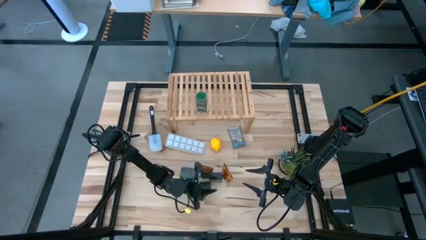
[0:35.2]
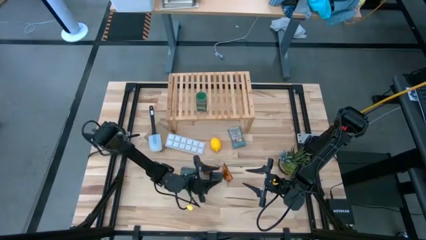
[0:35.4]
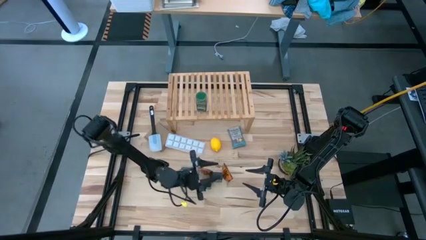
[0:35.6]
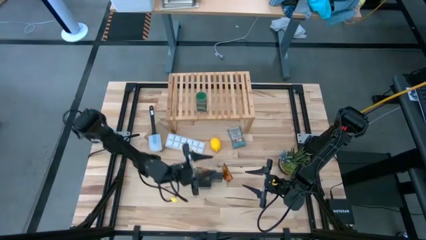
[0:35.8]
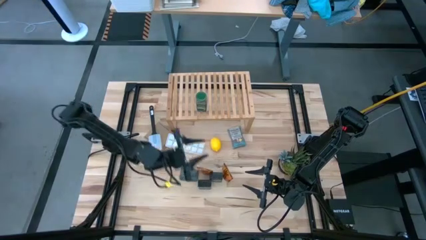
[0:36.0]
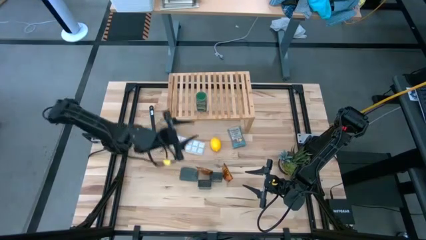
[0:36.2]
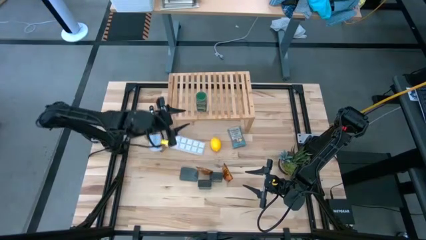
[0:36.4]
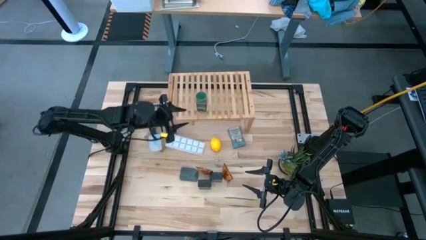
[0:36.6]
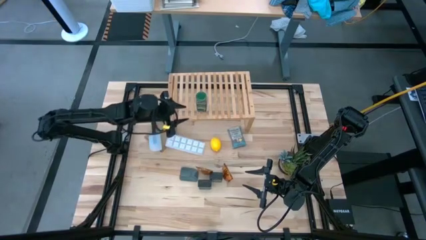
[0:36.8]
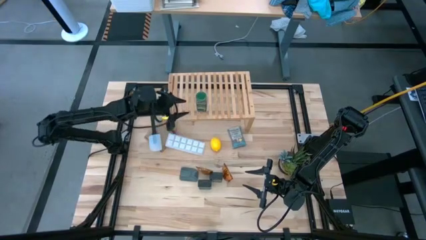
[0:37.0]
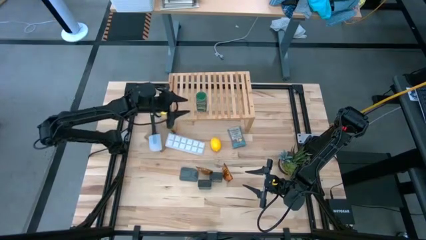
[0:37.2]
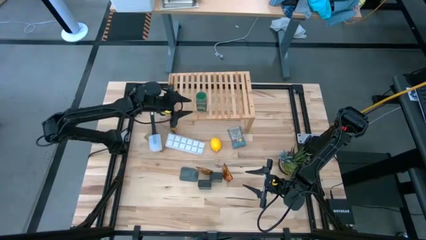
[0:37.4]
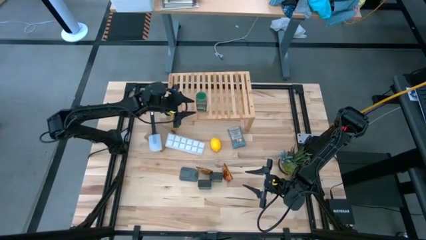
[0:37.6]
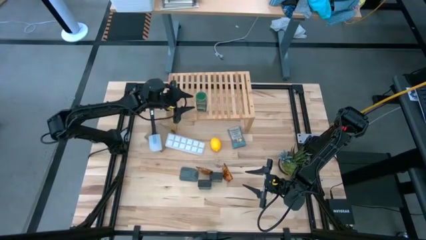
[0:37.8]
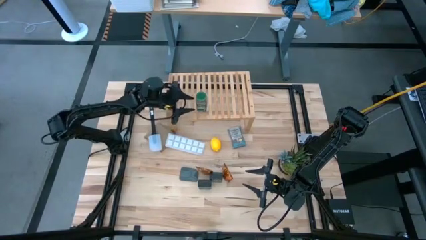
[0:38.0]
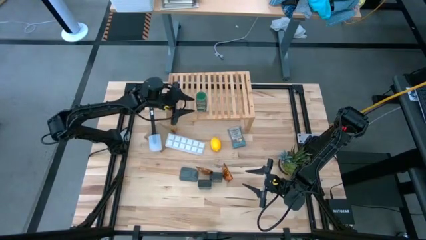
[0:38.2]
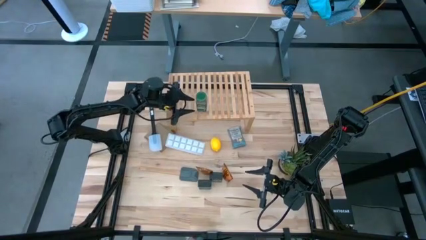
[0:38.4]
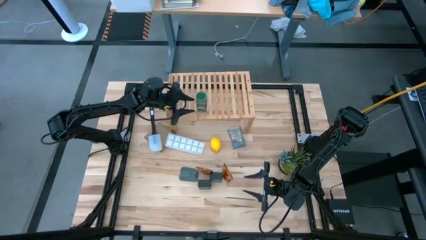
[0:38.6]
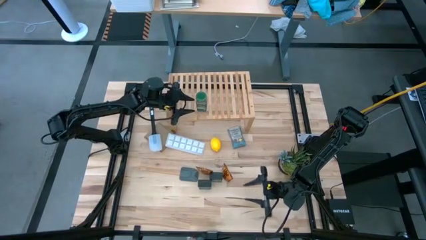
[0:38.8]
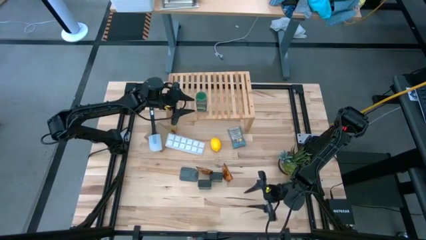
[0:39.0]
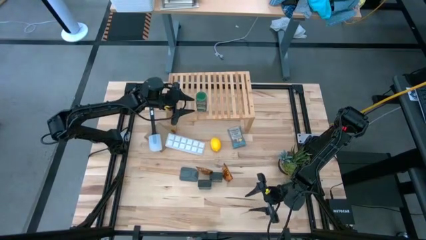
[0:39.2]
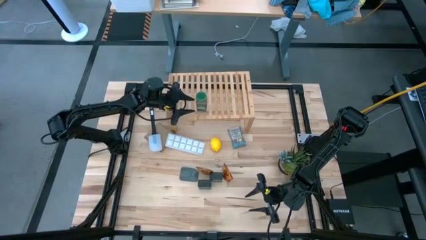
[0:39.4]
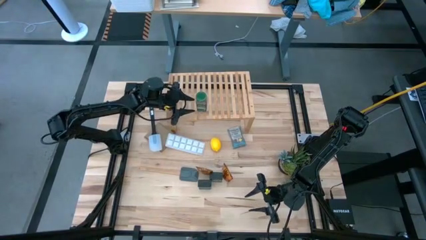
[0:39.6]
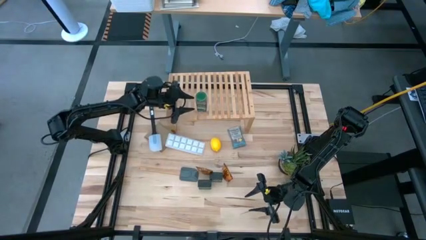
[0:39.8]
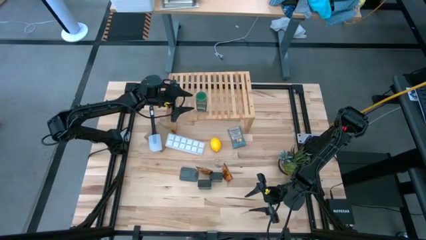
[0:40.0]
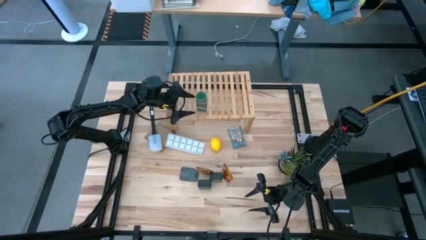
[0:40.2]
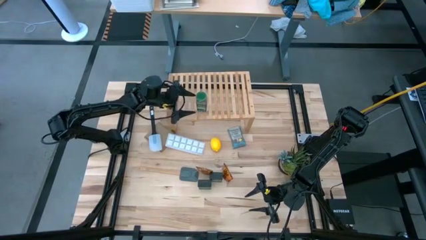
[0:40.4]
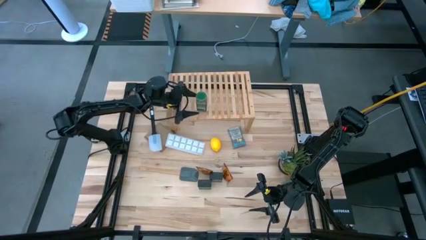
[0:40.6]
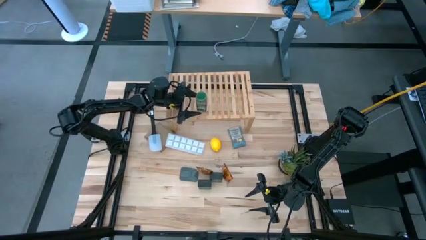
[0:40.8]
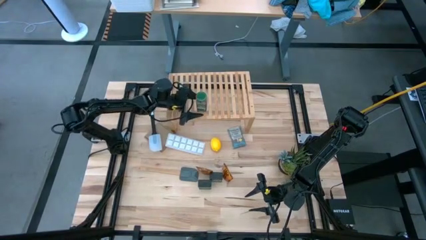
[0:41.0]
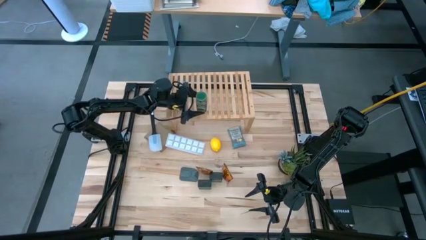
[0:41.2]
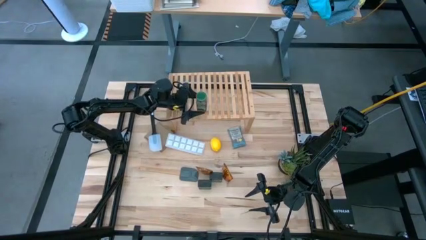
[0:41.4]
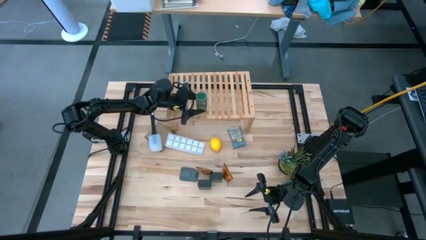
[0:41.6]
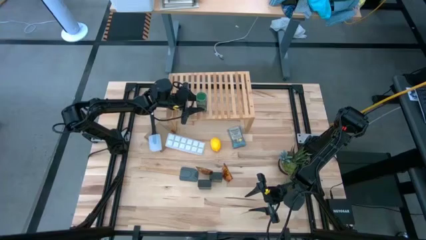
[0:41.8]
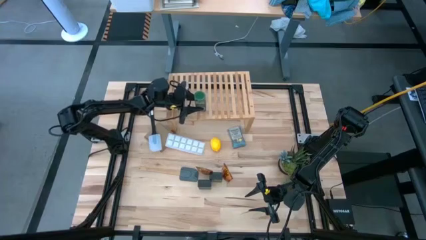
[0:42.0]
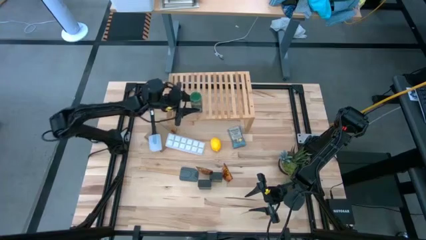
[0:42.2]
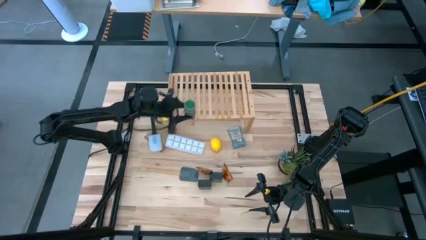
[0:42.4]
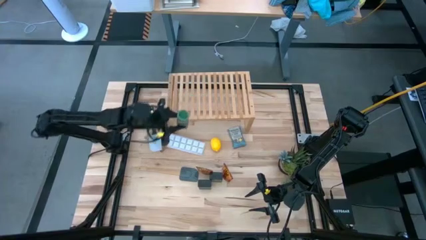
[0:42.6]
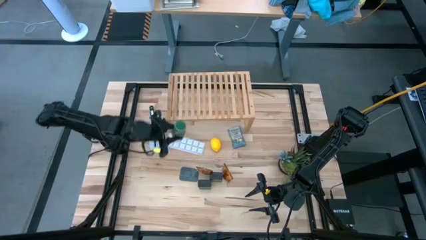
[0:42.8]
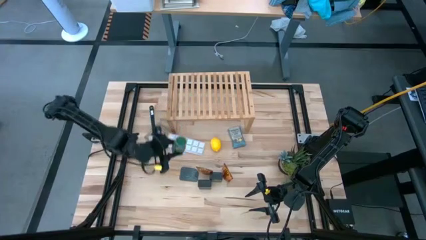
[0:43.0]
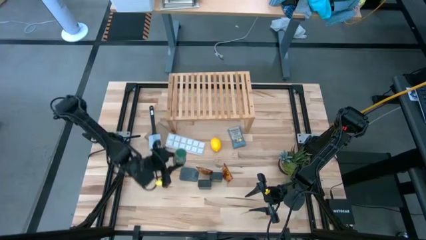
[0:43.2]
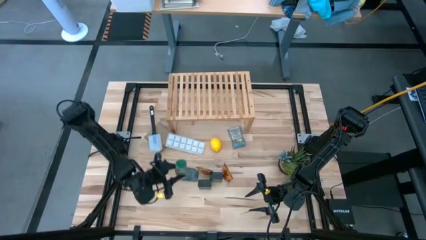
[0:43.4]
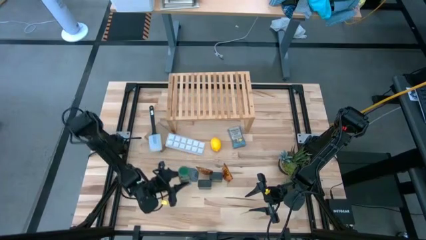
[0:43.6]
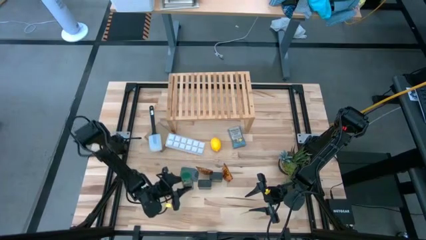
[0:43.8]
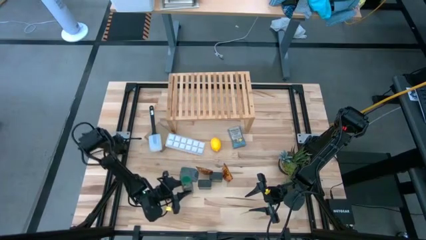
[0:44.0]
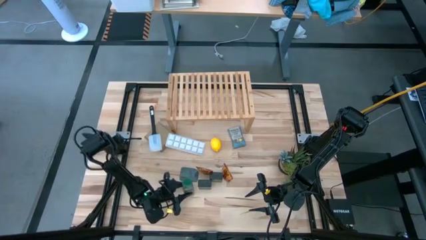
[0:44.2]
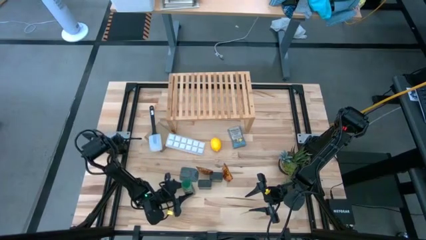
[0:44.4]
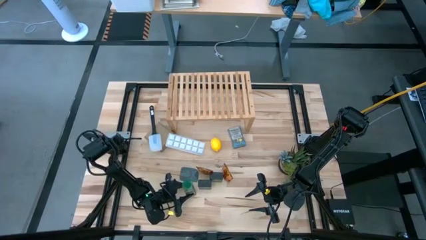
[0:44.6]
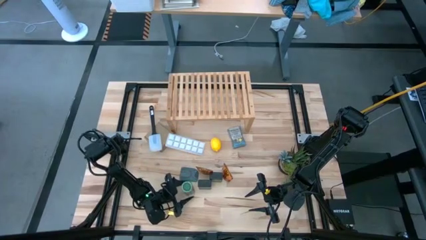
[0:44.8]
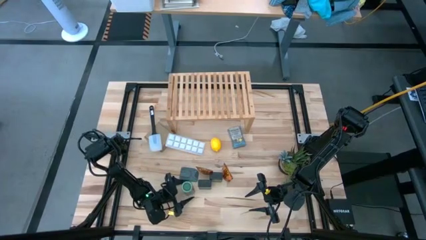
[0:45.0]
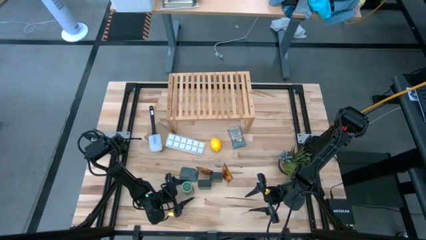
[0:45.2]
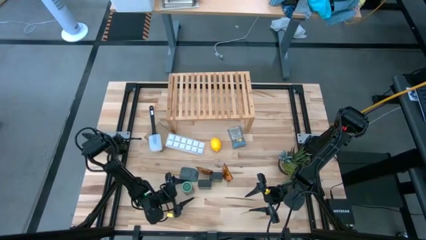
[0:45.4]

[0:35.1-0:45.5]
Task: Shelf spices
Remove the green seasoning bottle from the shelf

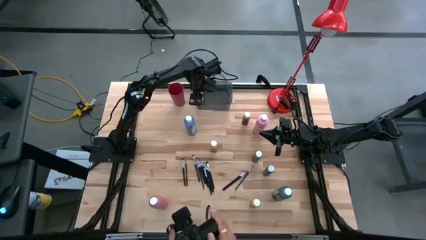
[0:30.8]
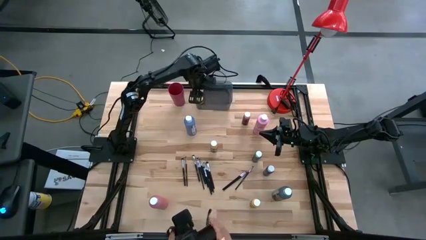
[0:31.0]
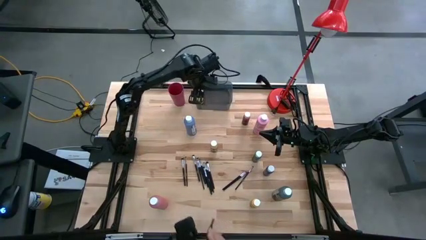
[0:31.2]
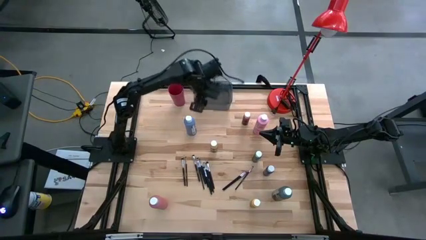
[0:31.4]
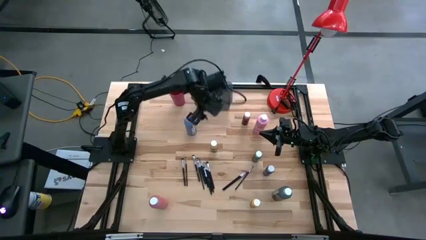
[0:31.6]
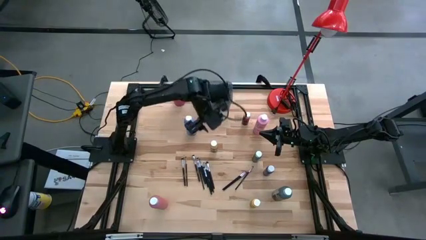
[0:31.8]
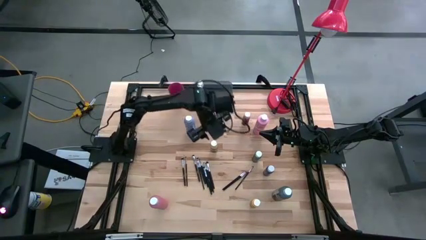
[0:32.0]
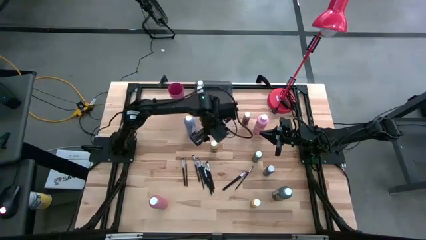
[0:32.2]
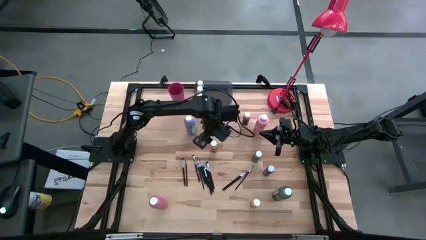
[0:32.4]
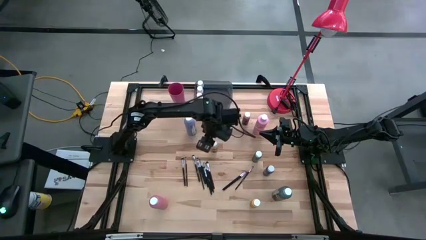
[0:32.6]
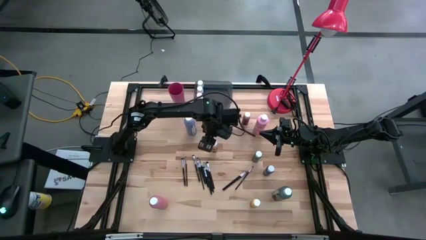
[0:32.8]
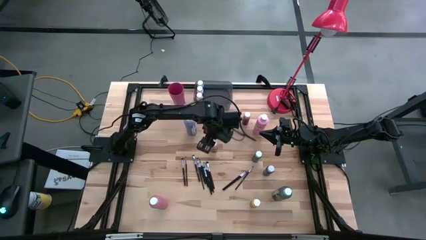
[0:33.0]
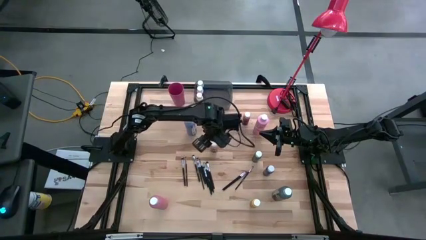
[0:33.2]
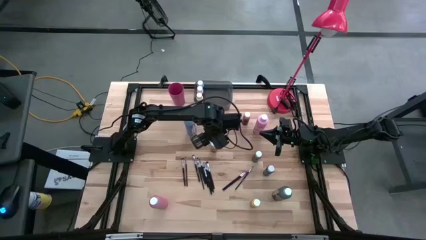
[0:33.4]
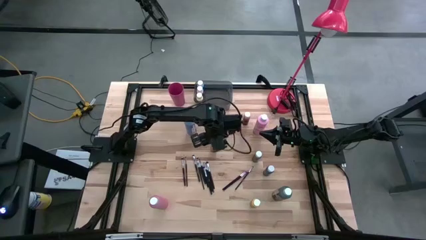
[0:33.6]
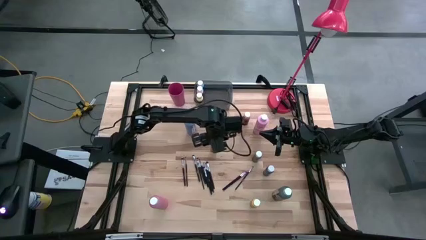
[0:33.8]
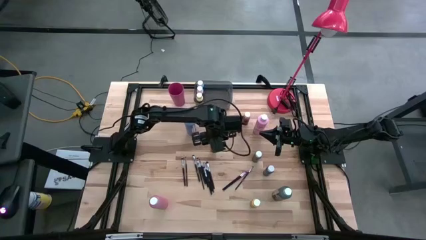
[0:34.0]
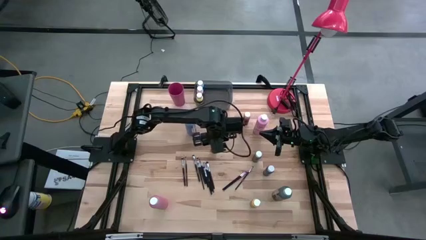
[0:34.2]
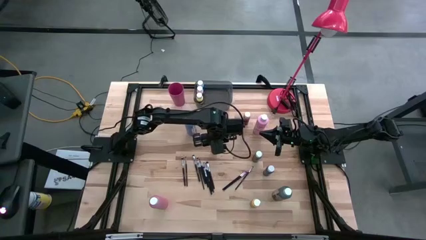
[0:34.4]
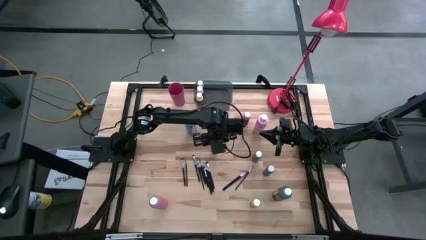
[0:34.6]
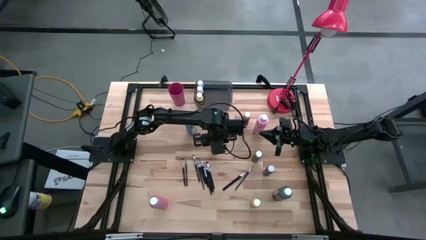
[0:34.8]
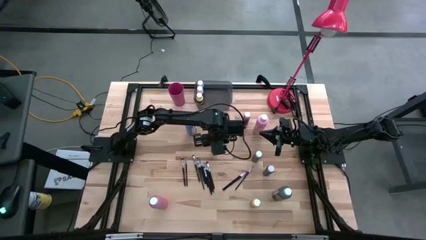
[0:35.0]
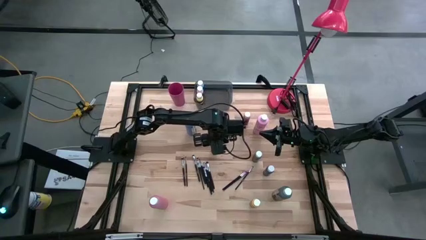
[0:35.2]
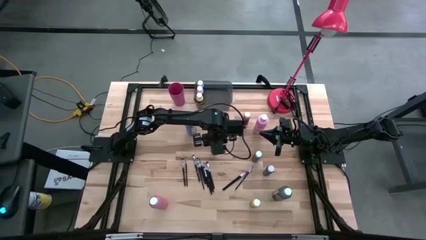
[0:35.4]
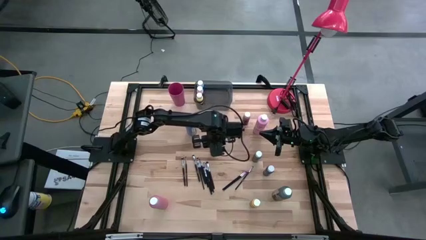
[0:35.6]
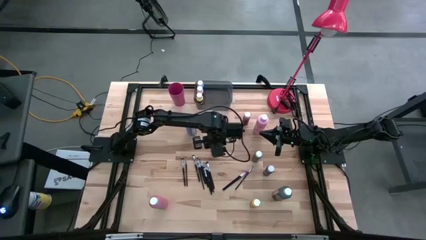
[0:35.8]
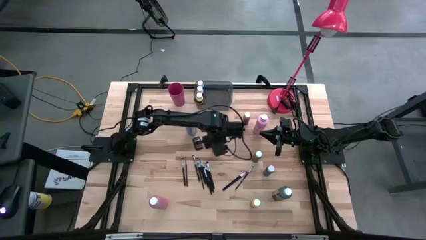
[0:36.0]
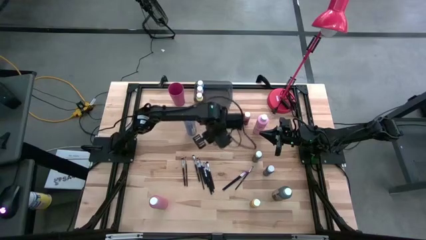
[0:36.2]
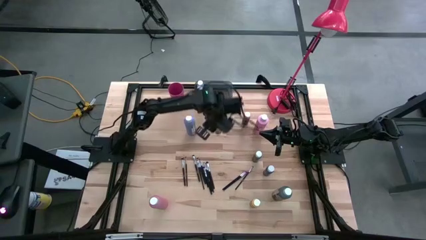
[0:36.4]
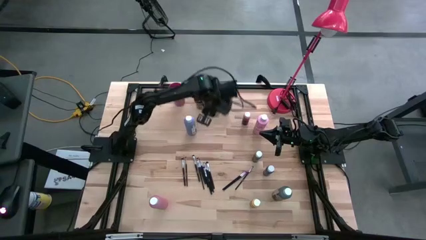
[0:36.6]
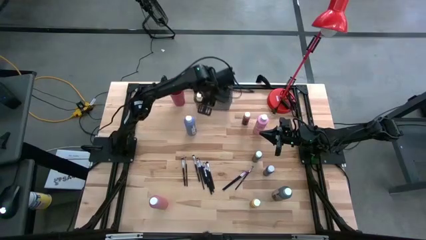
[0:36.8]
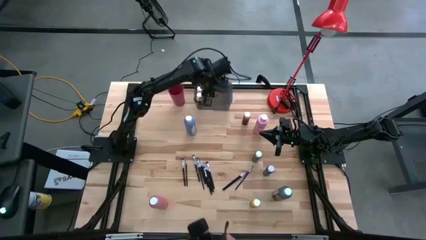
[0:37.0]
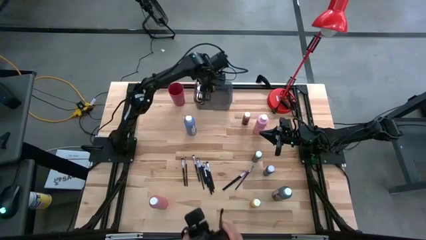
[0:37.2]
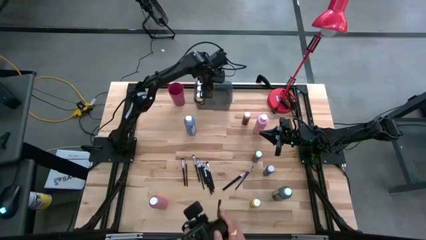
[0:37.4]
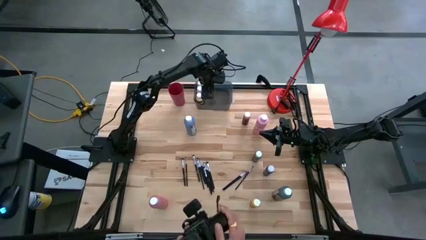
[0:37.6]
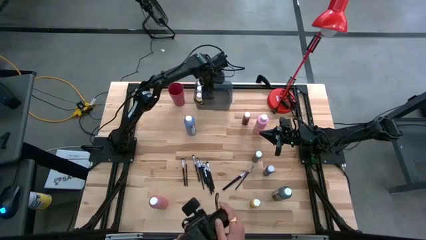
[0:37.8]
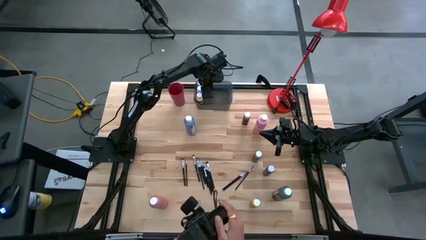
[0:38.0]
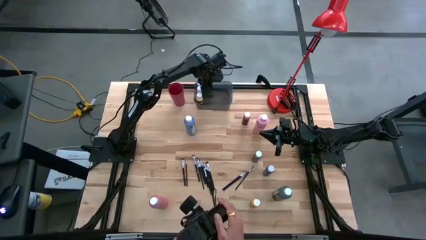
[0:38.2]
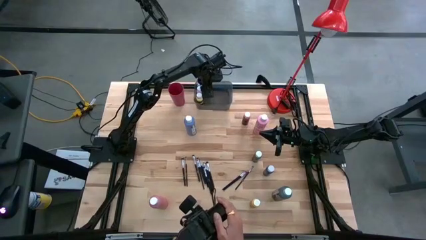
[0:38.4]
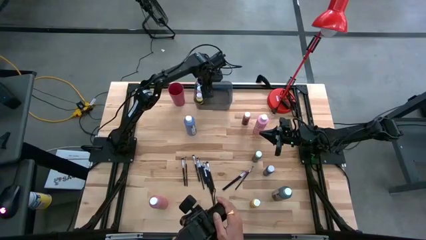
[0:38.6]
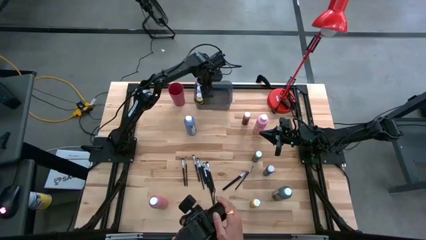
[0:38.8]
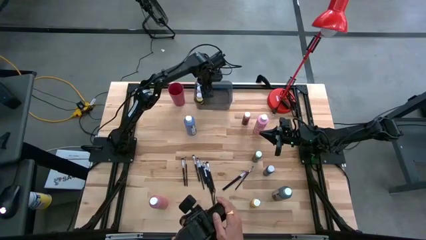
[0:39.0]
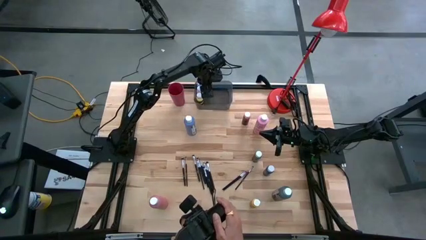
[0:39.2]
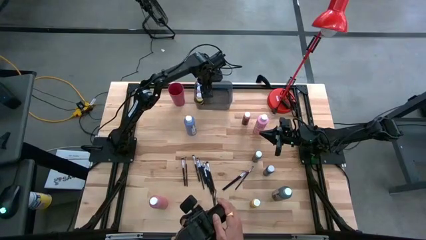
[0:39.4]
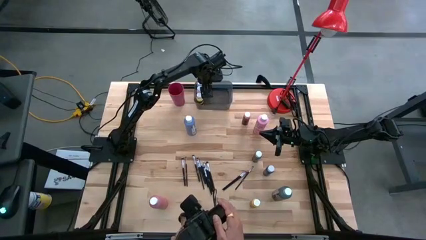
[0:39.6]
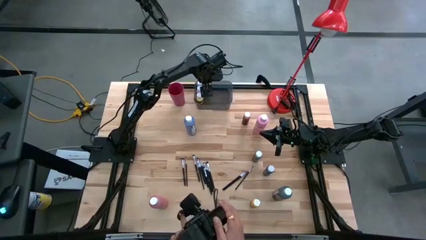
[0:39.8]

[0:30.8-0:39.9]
Task: Pick & Place Paint Supplies
Put the dark yellow paint bottle into the black bin
